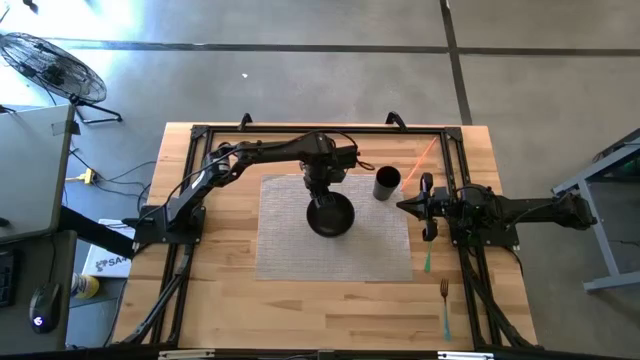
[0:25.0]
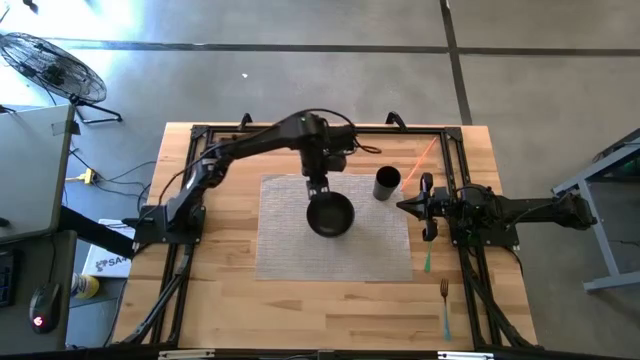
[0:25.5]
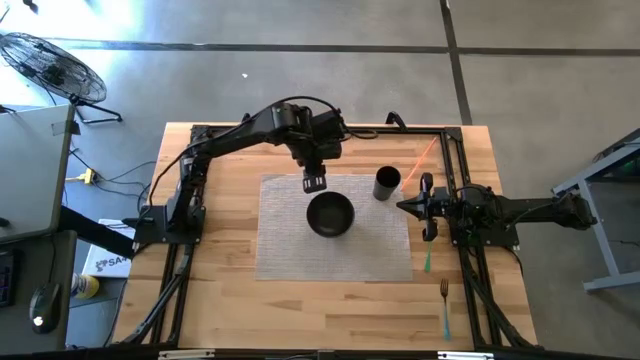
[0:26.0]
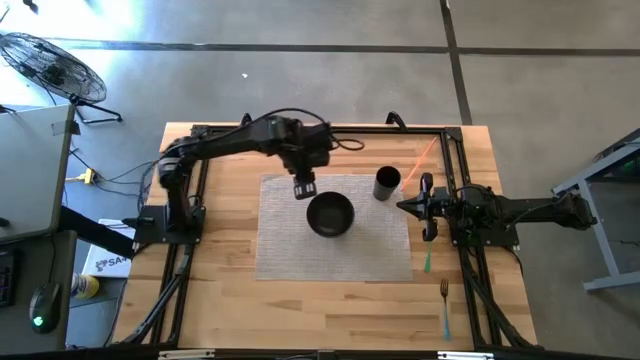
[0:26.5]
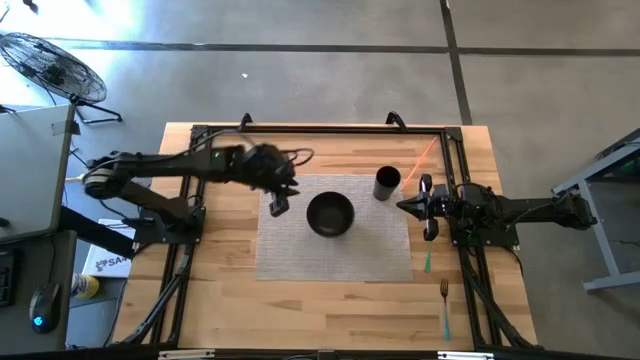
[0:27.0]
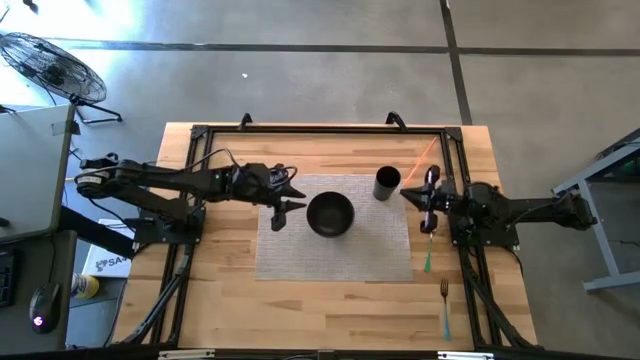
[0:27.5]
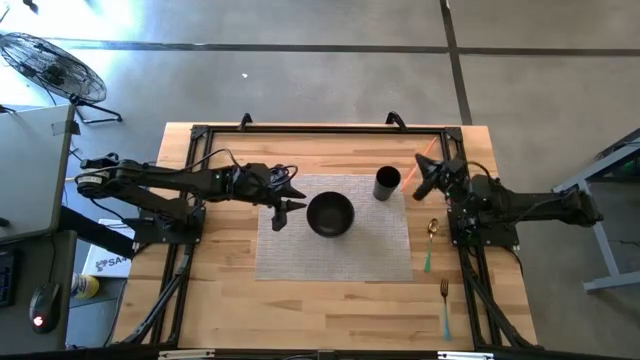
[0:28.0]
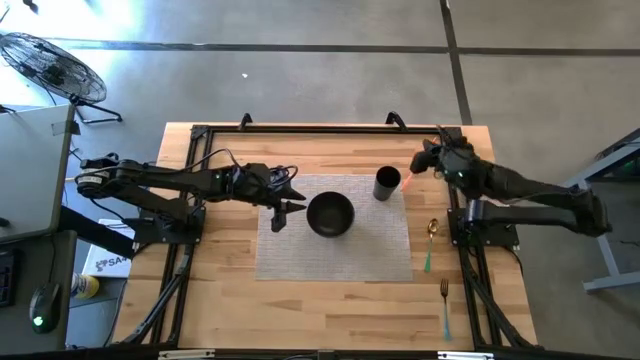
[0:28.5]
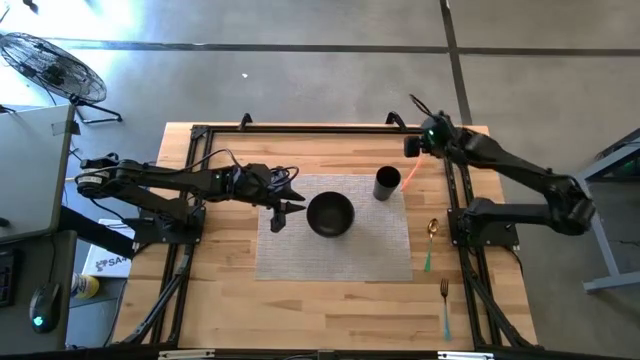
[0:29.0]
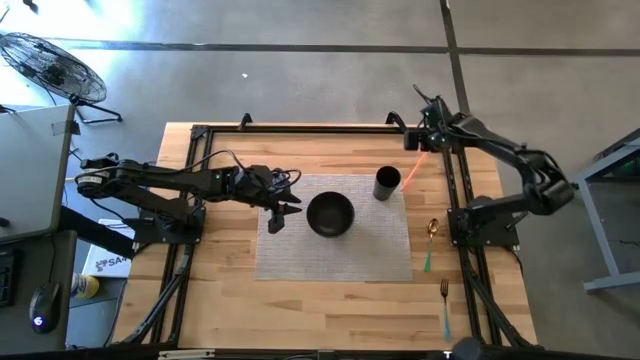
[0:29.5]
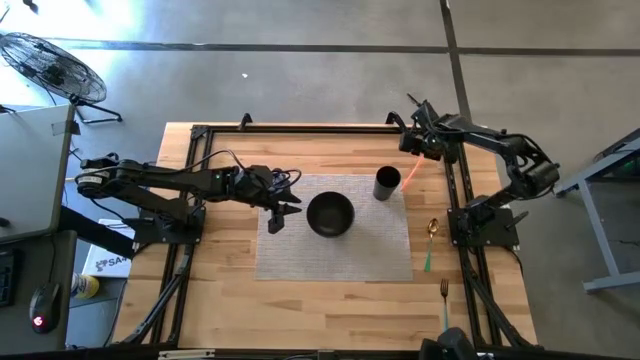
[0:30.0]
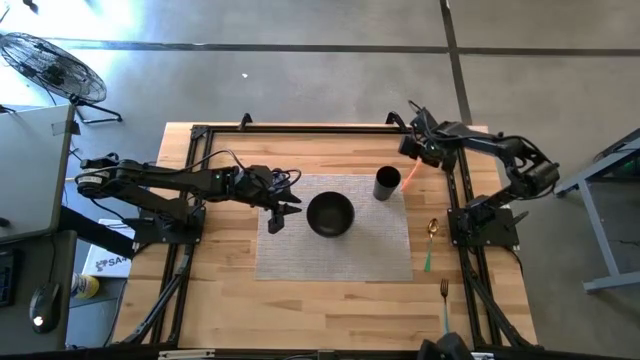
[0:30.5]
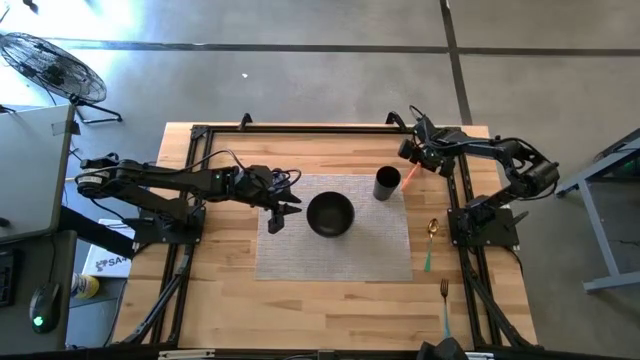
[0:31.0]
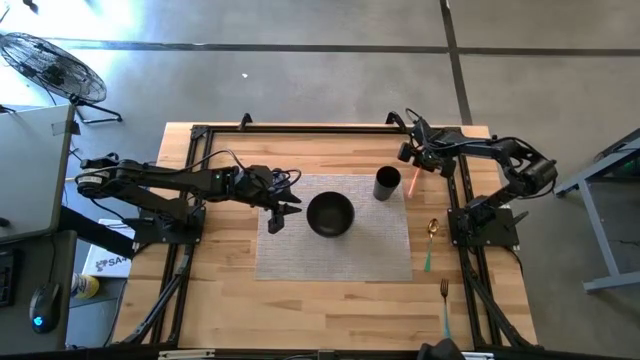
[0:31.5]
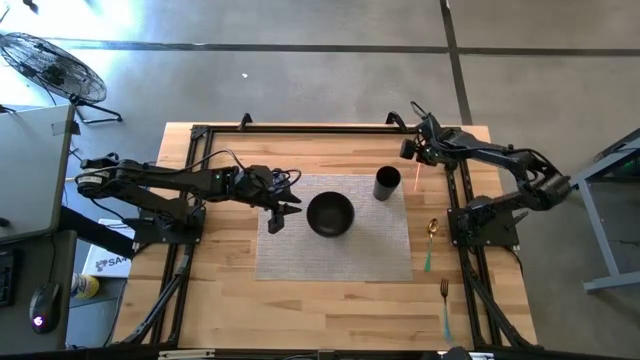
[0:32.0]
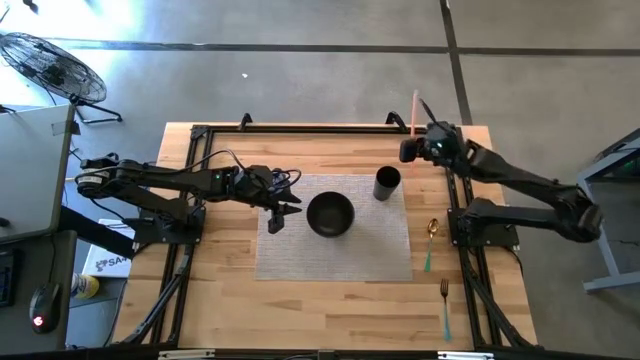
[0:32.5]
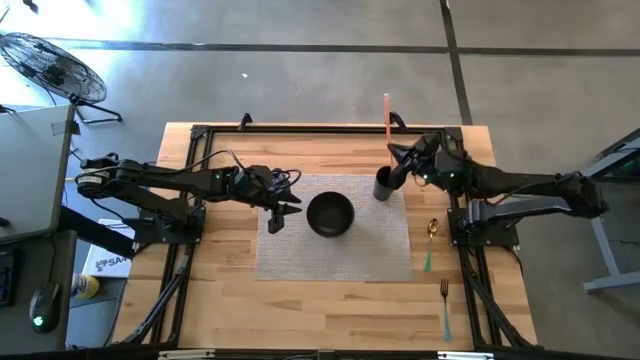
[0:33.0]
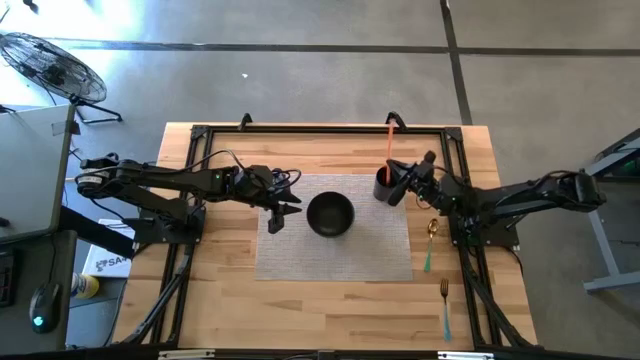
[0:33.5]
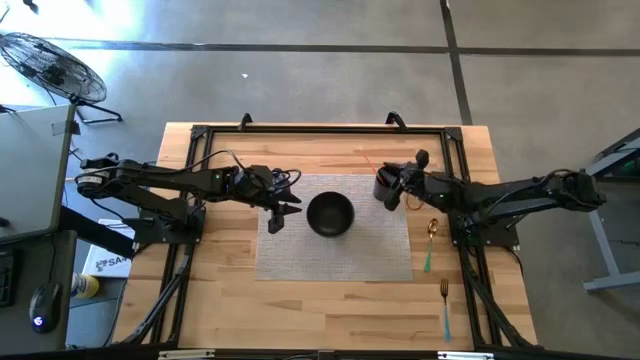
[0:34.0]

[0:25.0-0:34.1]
Task: Pick & Place Utensil
Put the orange straw into the black cup to the top right of the black bowl

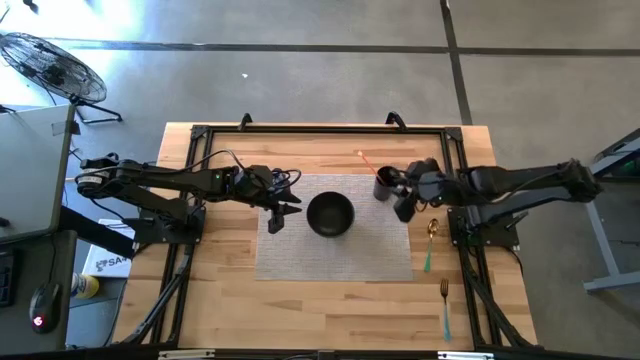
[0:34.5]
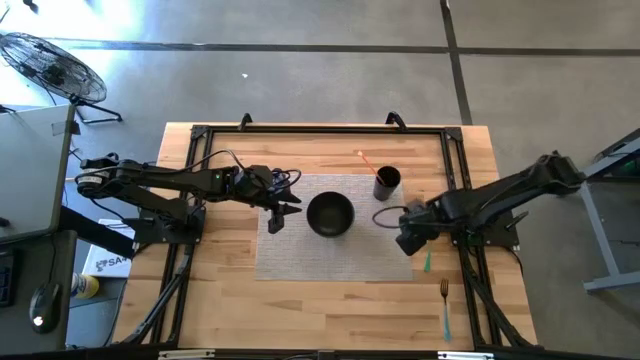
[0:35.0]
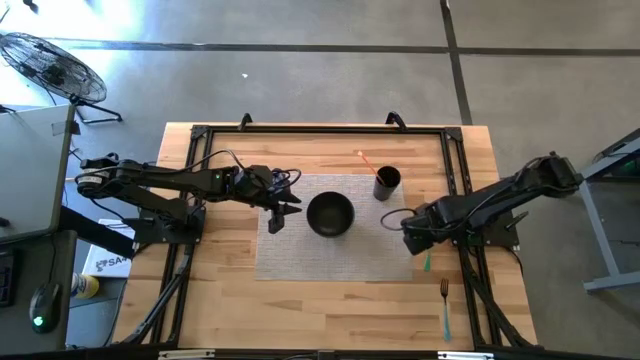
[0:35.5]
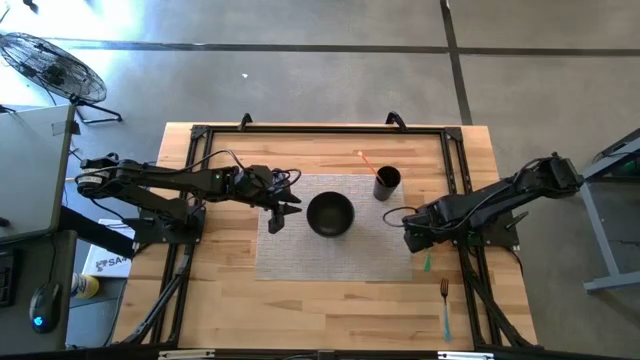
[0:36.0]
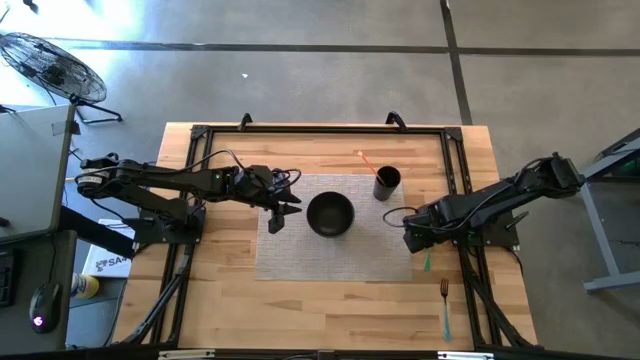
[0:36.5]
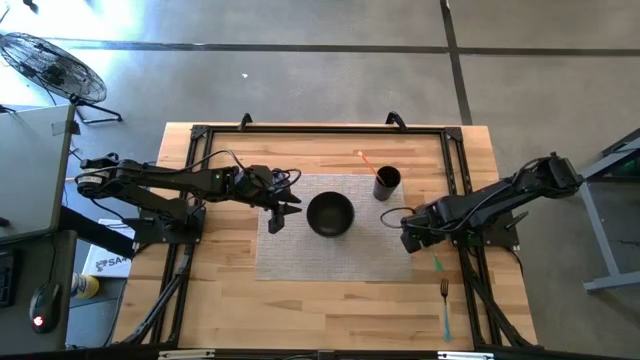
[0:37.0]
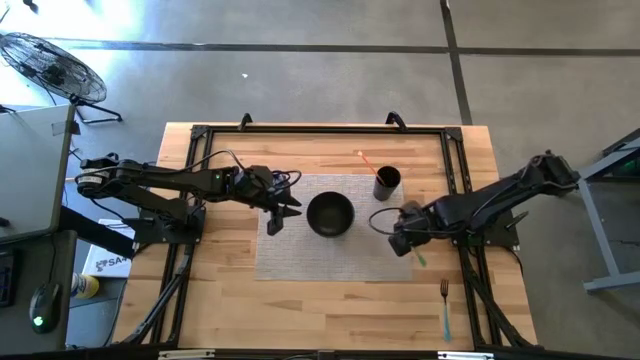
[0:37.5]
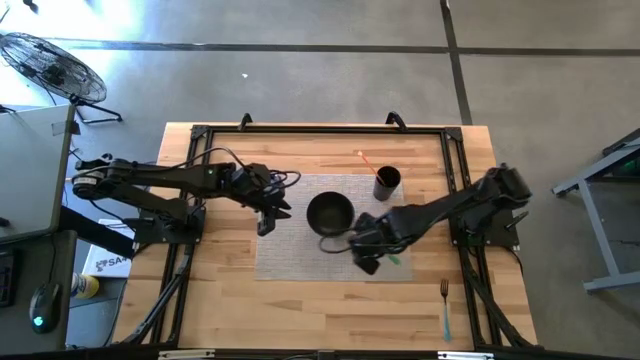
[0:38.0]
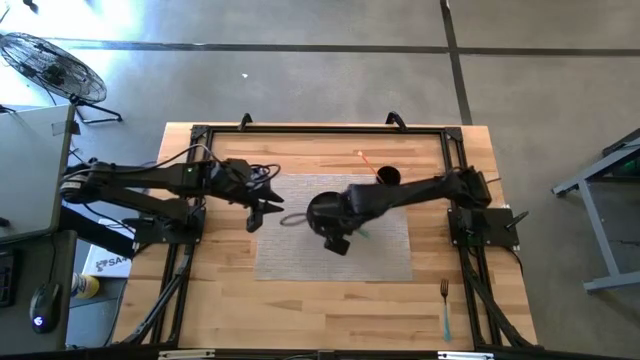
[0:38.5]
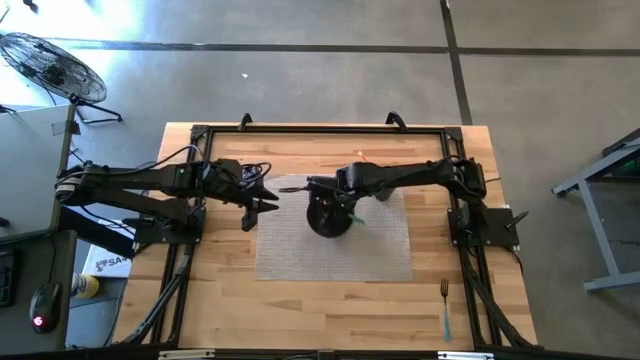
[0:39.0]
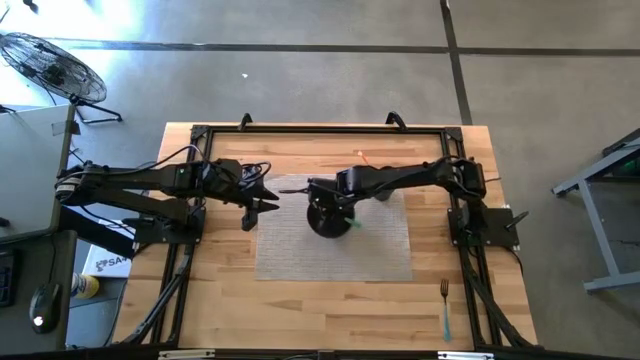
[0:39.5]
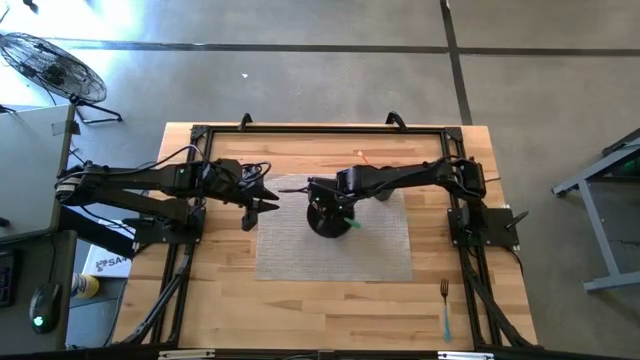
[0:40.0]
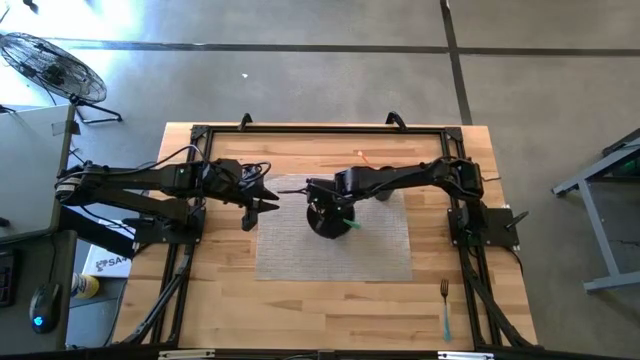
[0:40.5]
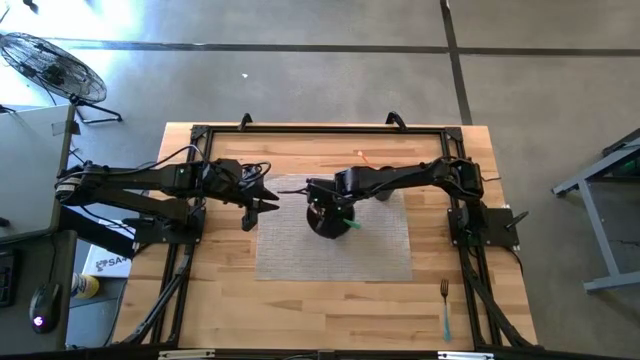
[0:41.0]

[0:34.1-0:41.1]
Put the green spoon into the black bowl to the bottom left of the black bowl

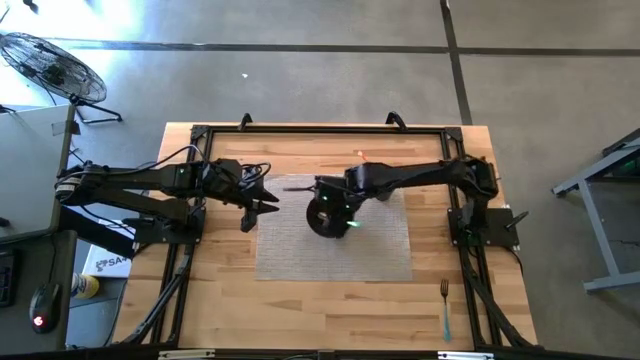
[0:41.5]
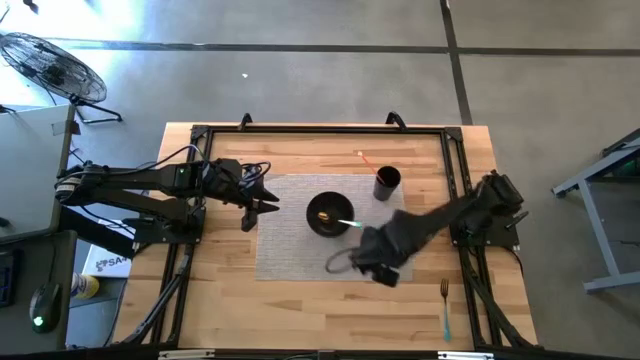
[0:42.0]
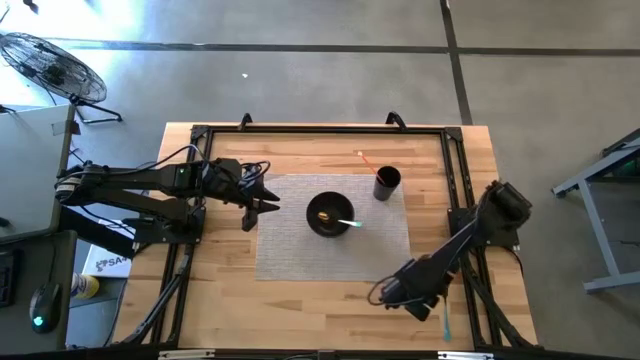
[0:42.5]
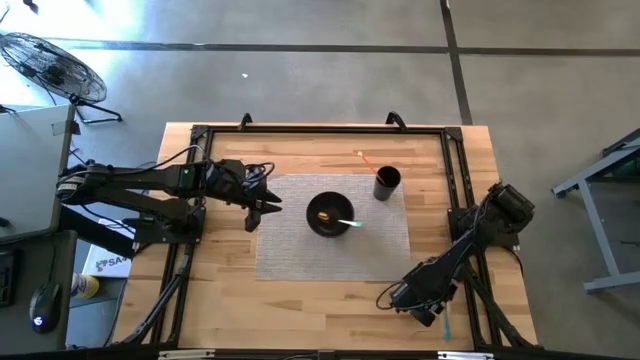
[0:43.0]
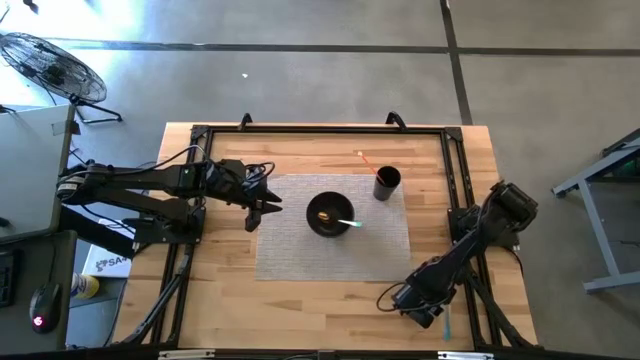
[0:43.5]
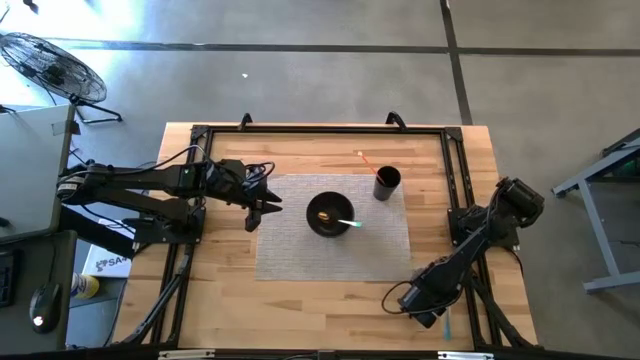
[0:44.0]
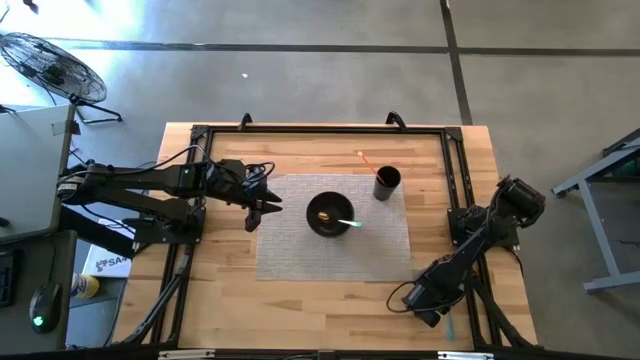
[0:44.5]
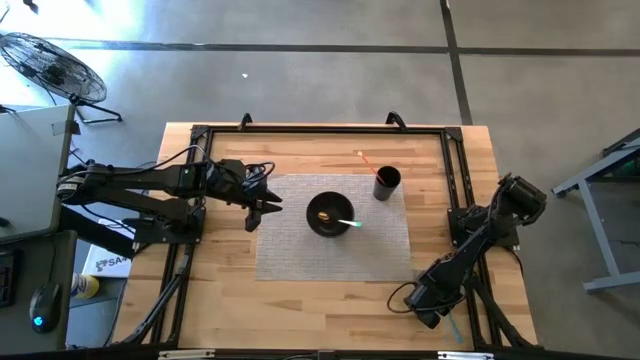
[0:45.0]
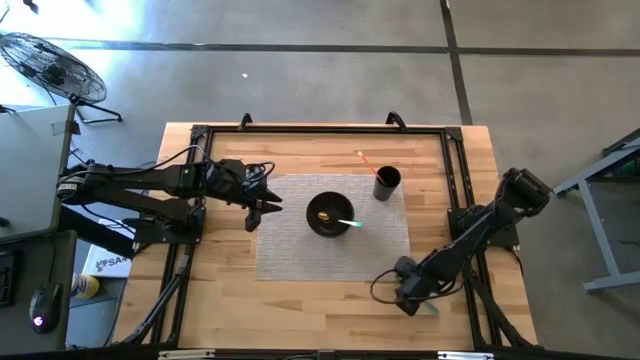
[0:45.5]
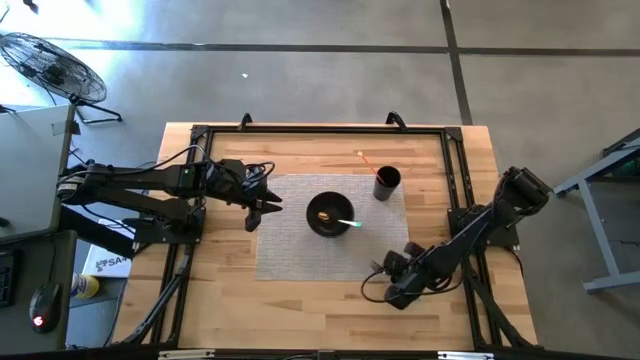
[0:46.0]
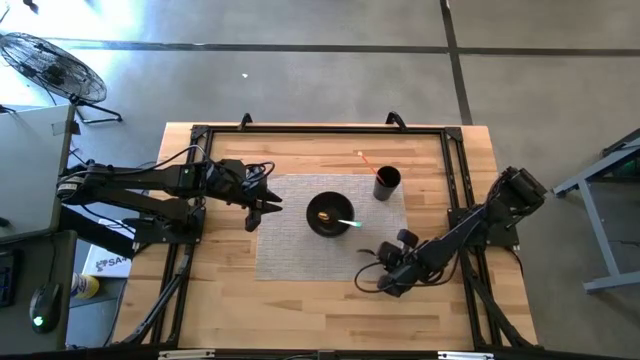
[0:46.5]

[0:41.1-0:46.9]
Put the blue fork into the black bowl to the bottom left of the black bowl
